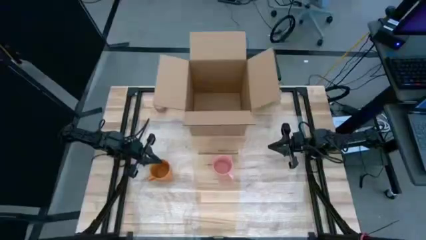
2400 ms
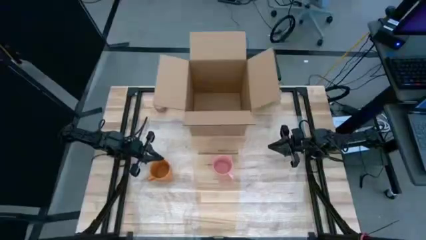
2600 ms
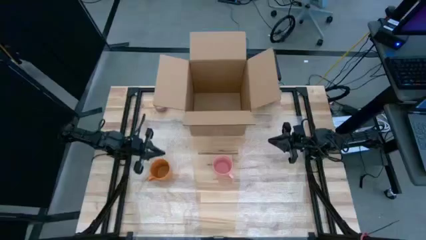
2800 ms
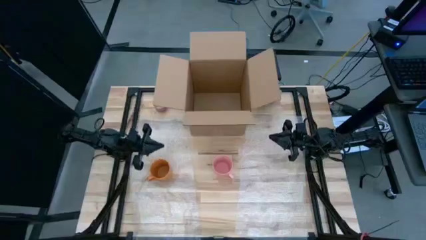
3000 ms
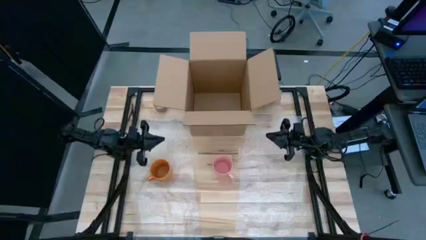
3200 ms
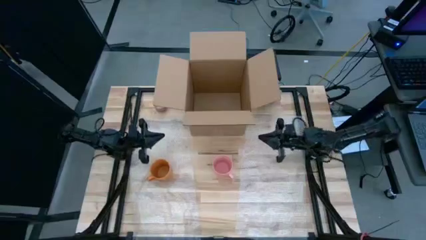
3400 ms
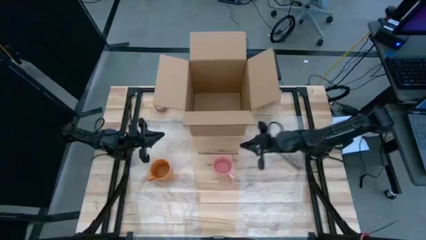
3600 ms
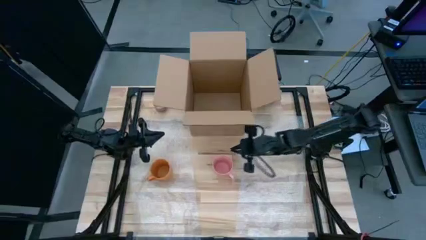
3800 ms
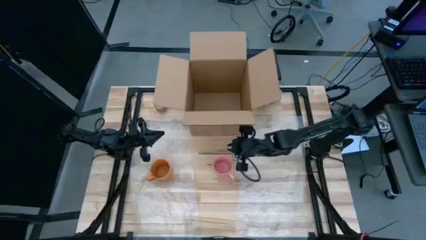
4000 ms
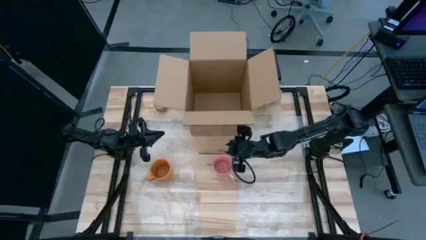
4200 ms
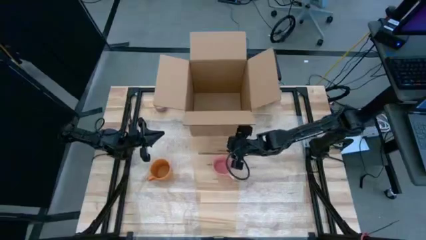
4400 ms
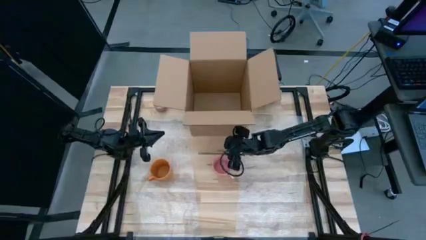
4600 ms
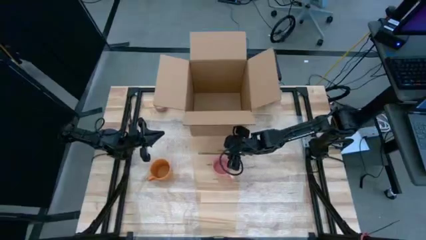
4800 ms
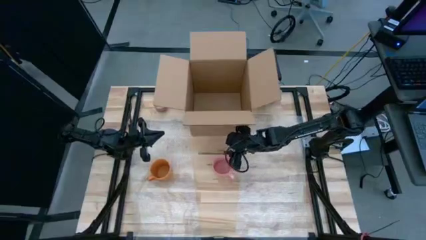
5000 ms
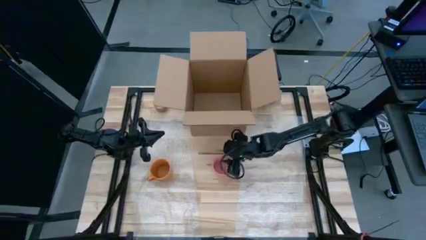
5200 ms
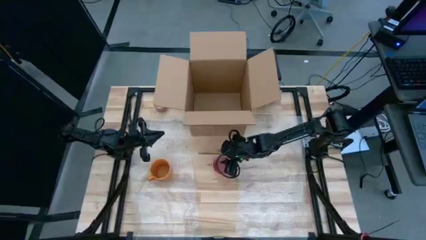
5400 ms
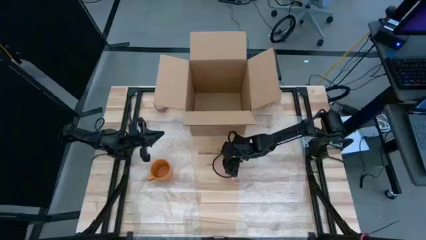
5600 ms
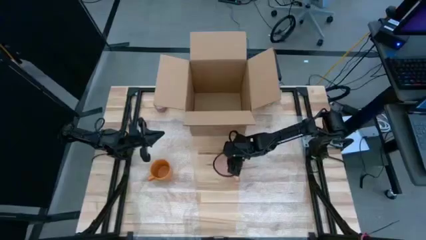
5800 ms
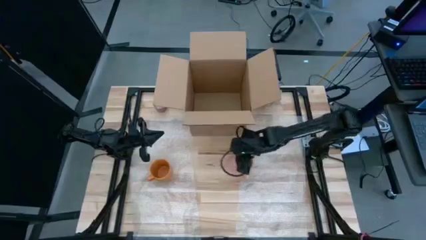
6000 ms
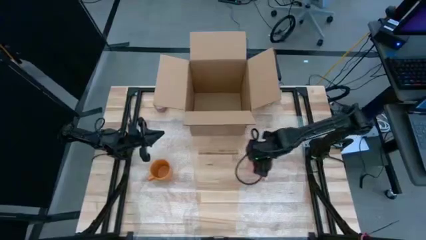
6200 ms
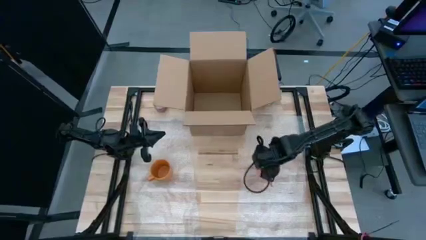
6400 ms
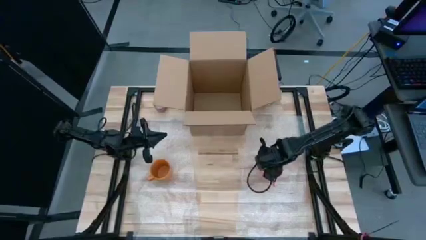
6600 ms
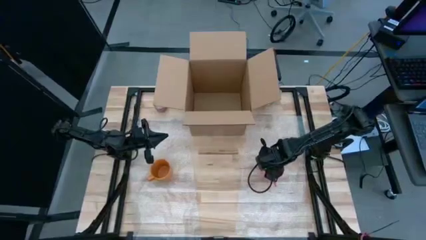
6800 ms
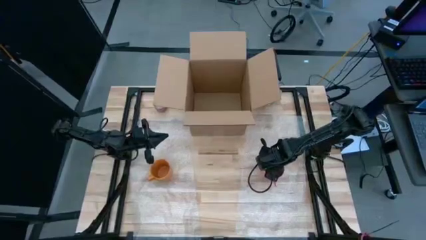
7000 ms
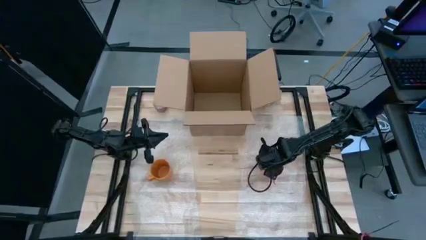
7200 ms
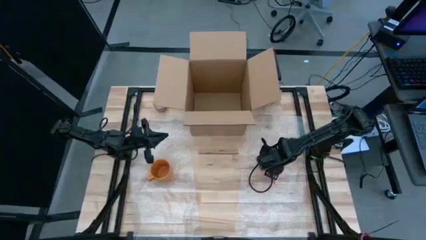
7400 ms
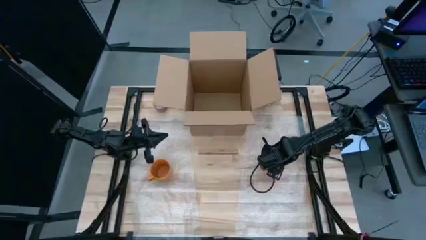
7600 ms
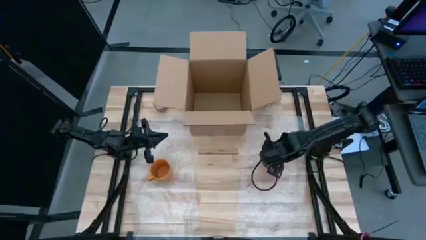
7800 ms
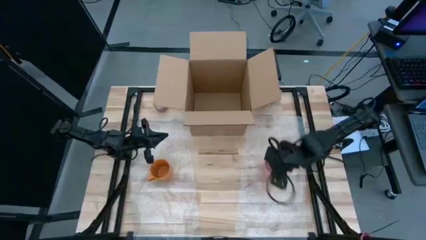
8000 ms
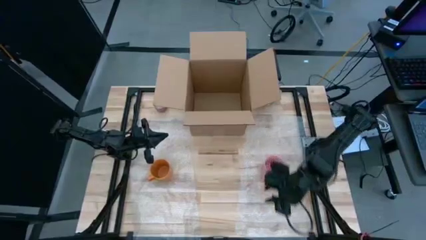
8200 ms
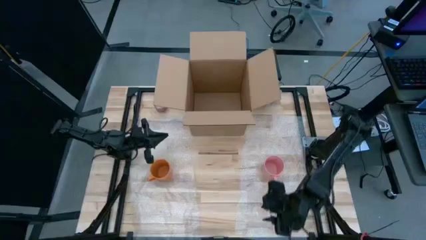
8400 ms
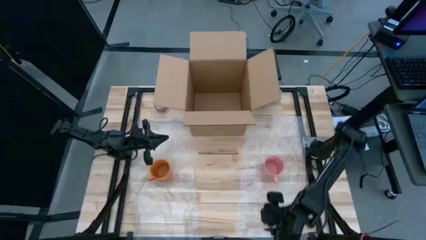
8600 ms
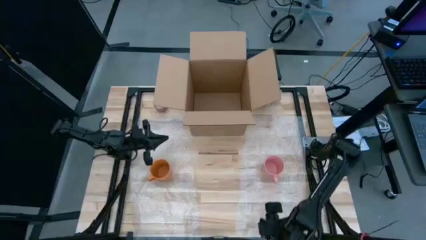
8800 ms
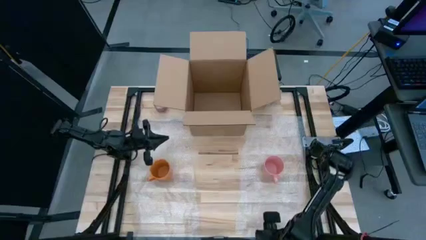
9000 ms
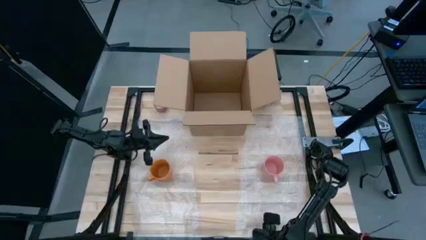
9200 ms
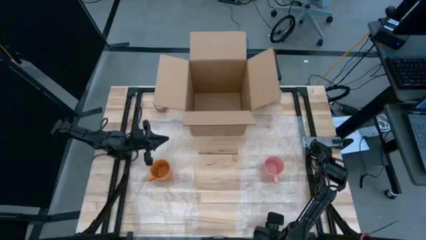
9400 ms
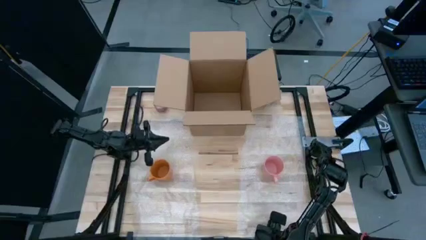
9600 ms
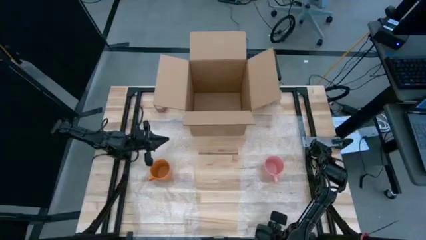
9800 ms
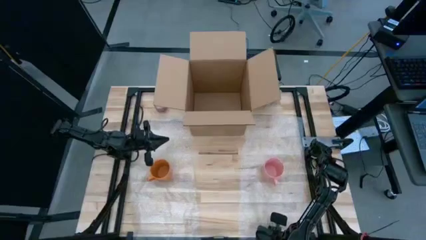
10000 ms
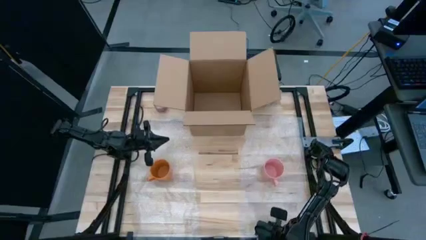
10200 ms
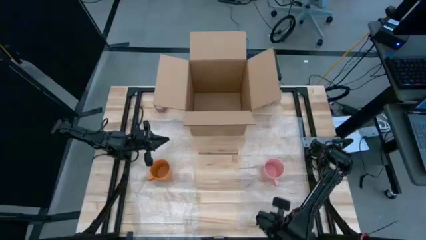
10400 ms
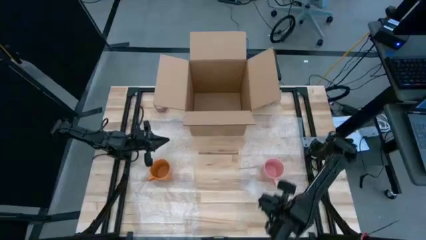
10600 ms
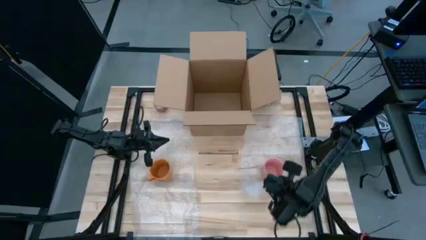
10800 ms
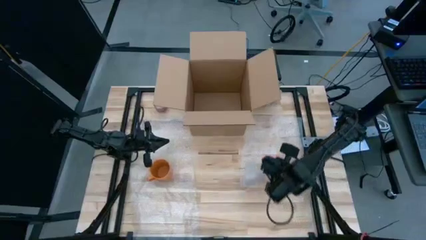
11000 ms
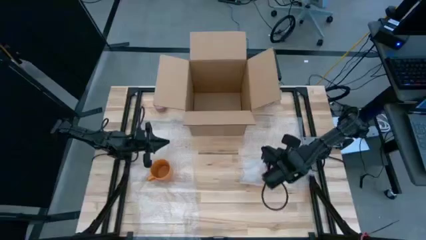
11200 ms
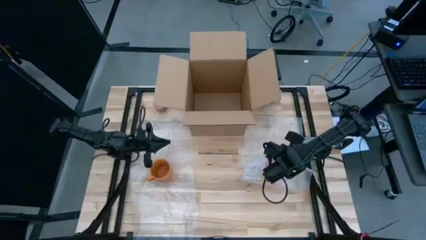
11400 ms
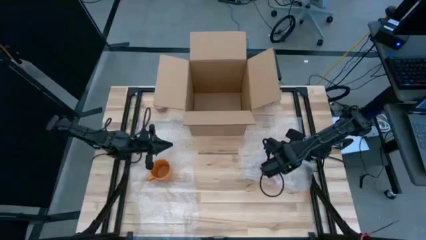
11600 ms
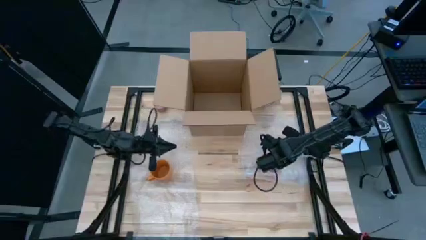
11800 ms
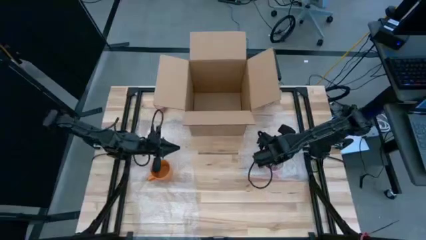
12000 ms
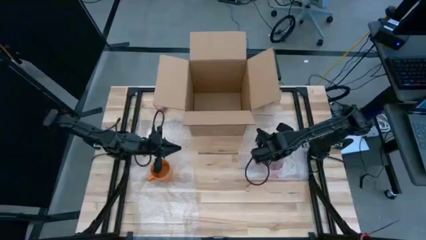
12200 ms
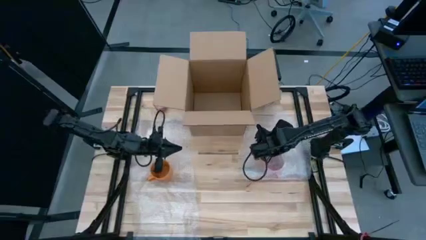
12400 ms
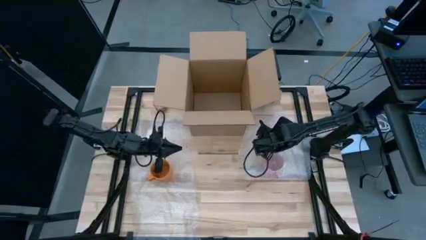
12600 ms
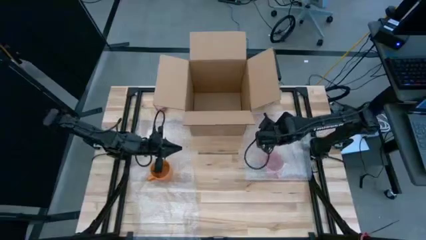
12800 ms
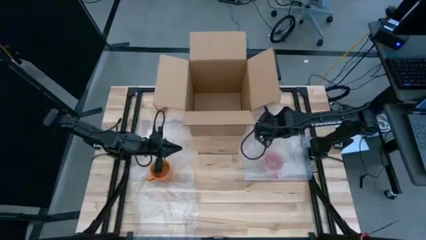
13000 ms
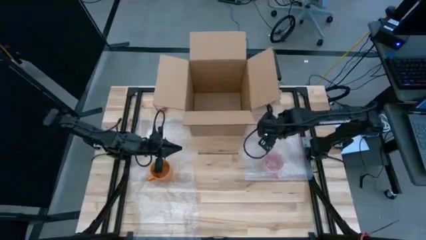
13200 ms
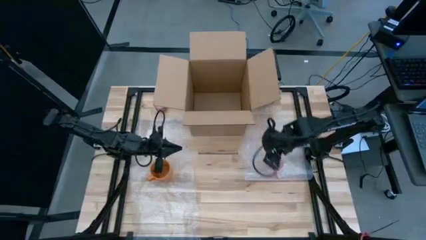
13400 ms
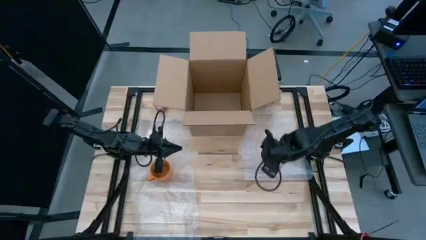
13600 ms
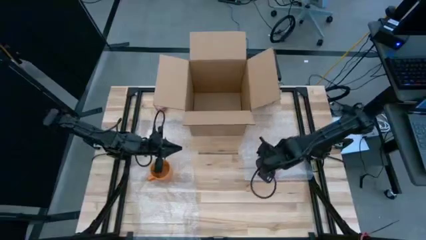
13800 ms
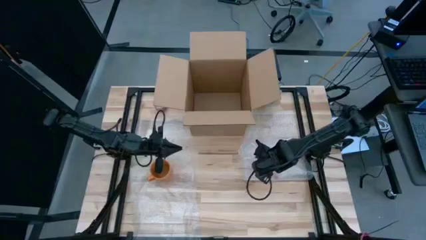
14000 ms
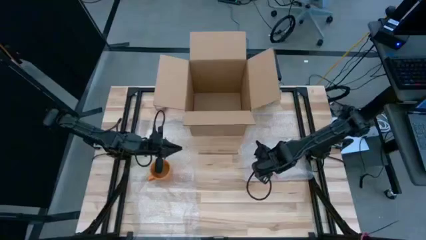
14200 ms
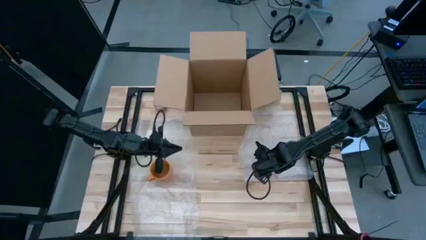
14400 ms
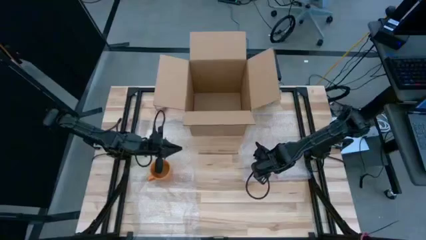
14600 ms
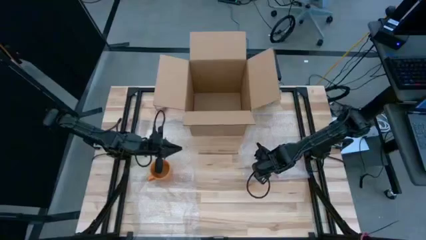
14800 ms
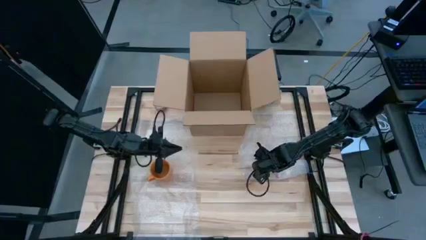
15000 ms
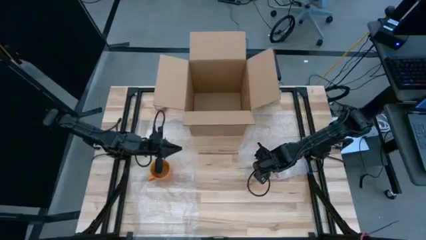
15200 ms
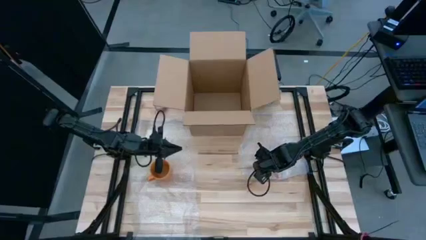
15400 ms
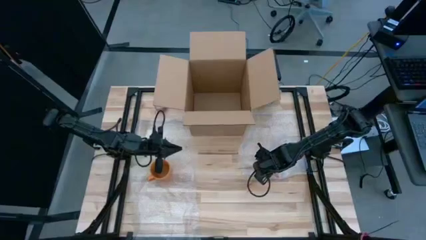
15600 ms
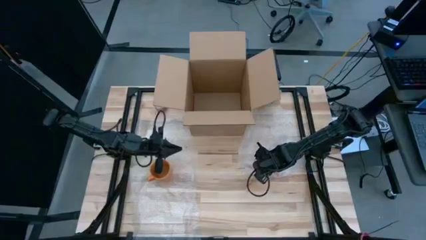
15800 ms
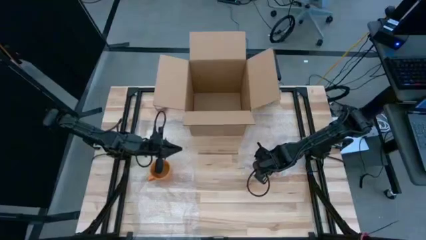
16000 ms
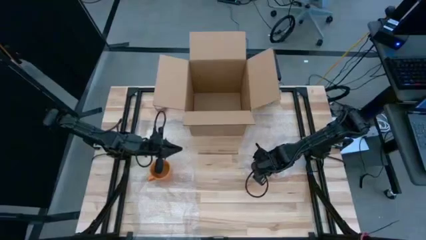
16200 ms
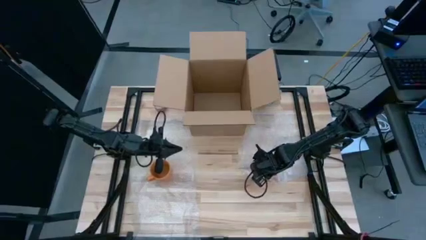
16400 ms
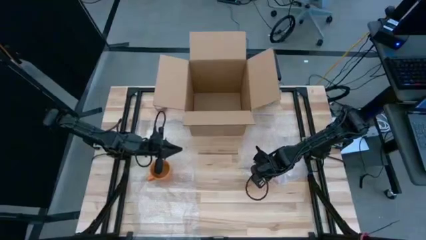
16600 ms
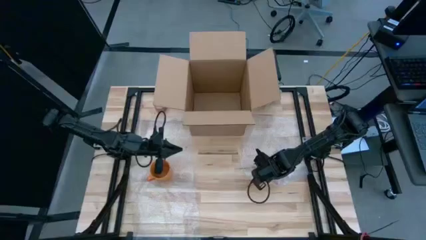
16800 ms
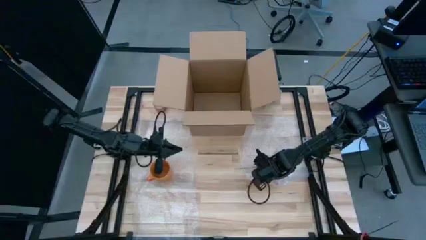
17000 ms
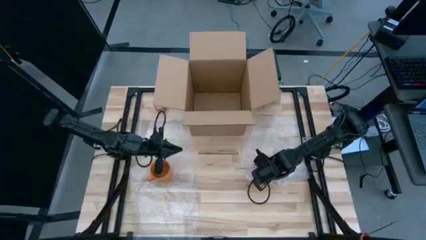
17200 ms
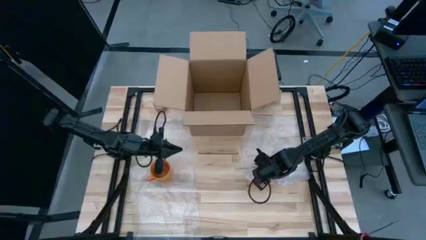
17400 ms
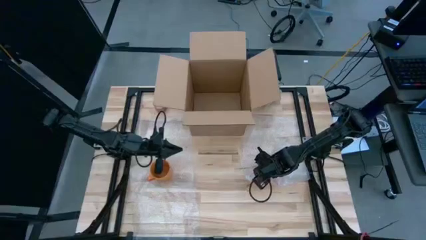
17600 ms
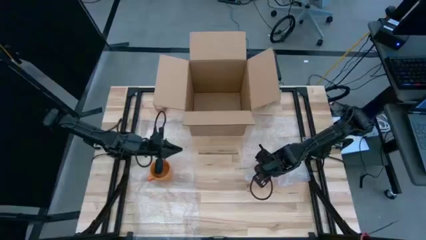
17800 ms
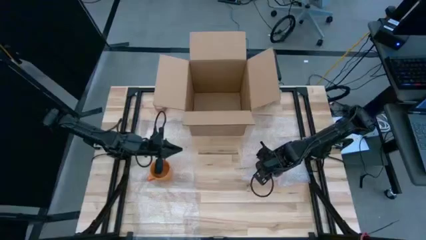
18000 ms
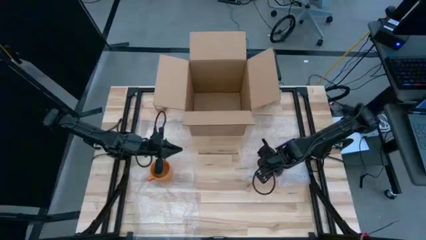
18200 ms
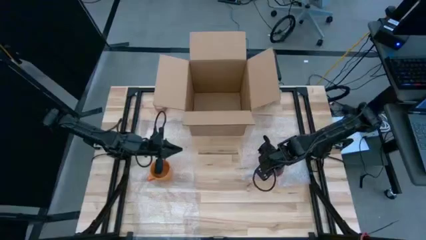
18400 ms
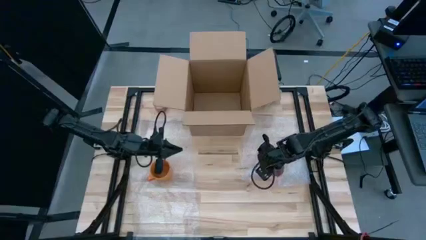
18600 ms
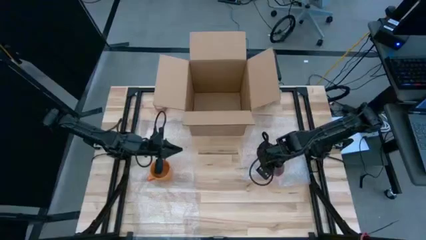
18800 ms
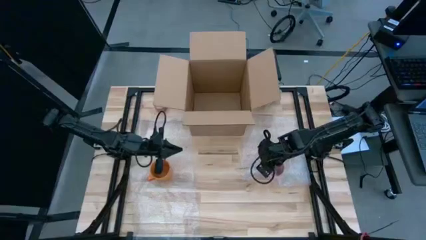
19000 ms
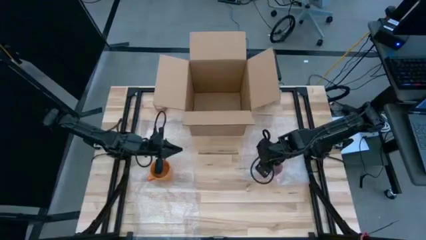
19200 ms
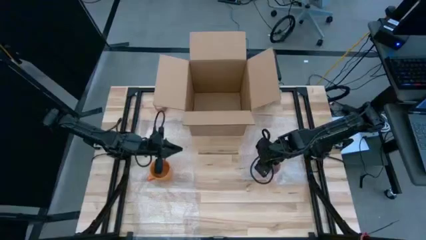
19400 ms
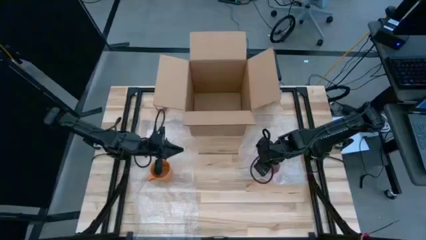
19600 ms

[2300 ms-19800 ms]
Task: wrap mug
Wrap the pink cup with bubble wrap
